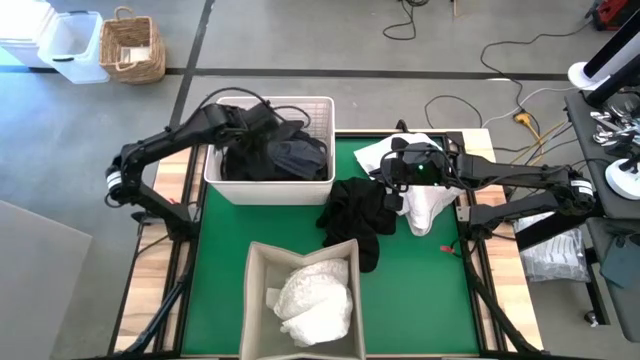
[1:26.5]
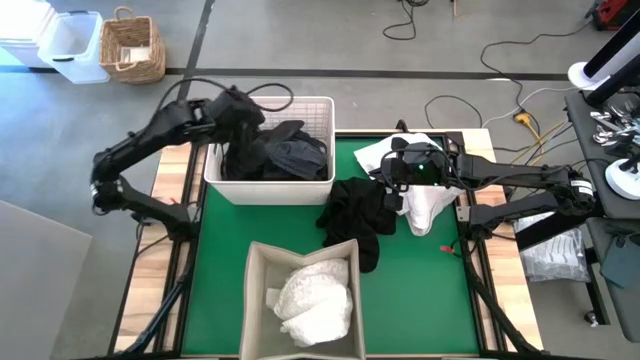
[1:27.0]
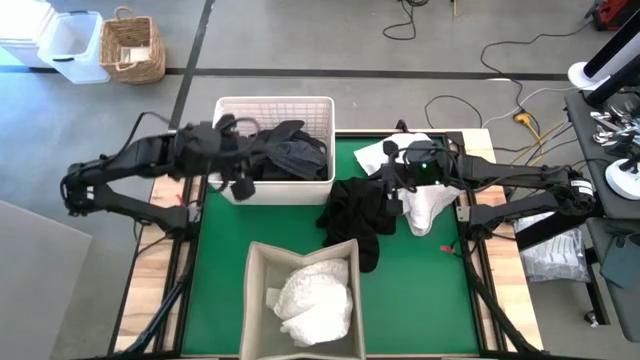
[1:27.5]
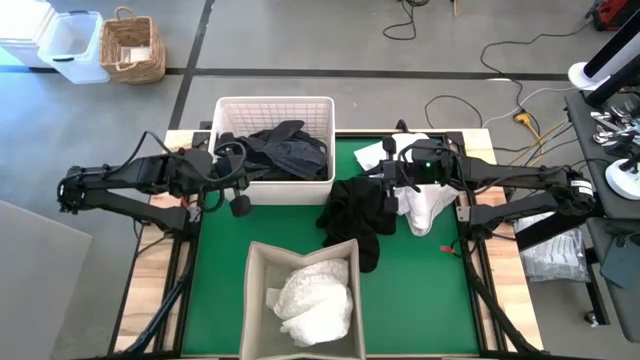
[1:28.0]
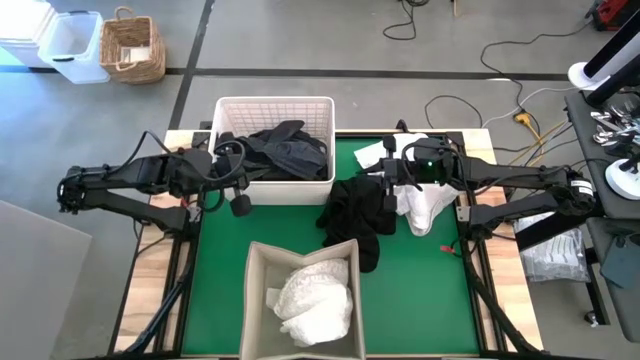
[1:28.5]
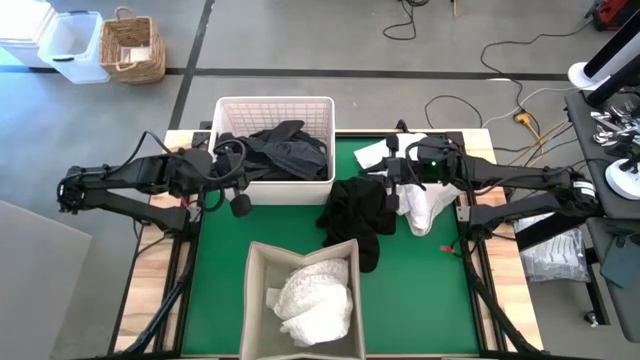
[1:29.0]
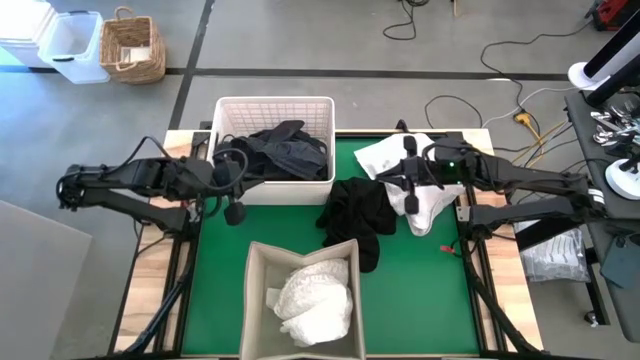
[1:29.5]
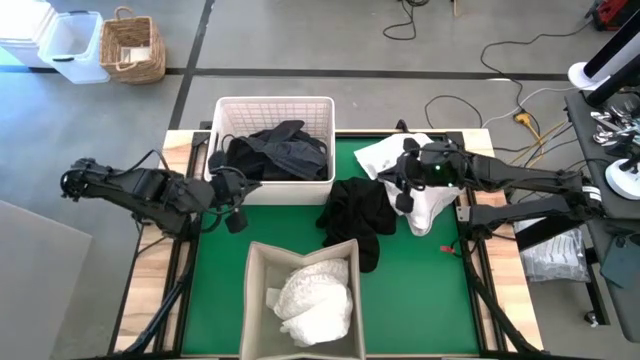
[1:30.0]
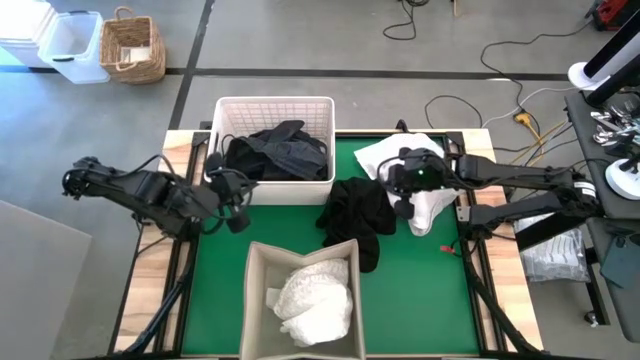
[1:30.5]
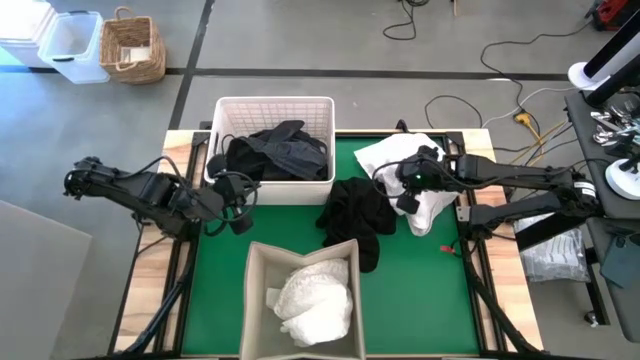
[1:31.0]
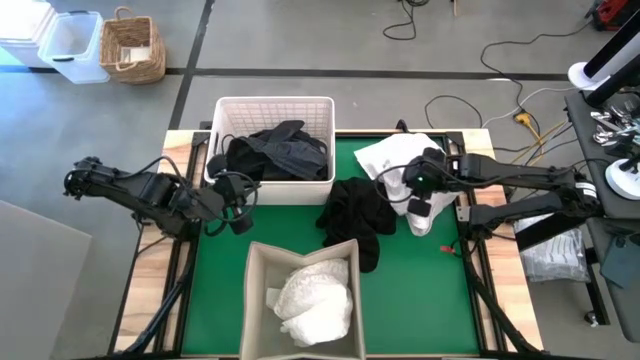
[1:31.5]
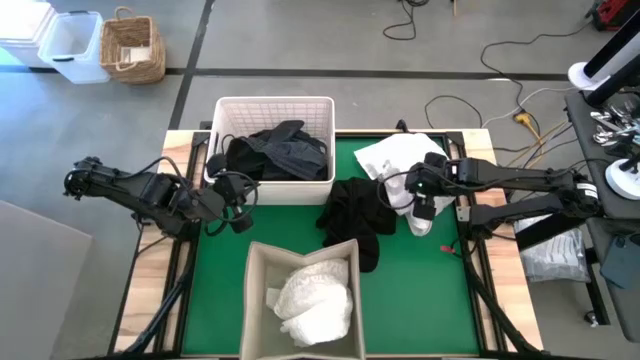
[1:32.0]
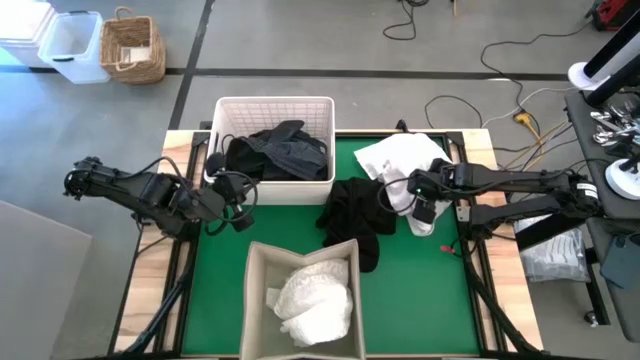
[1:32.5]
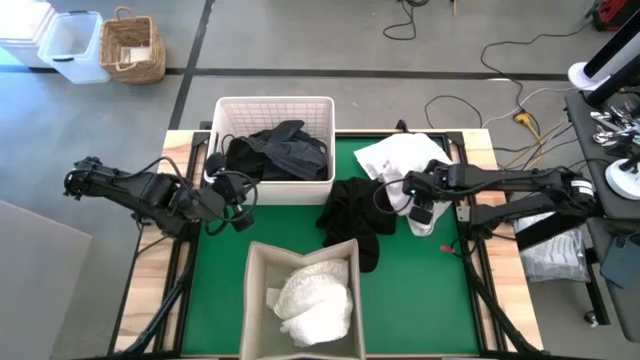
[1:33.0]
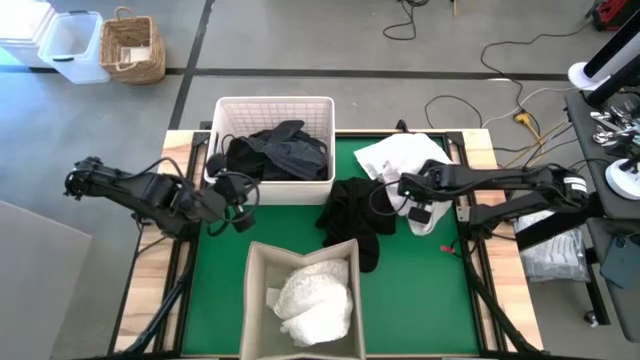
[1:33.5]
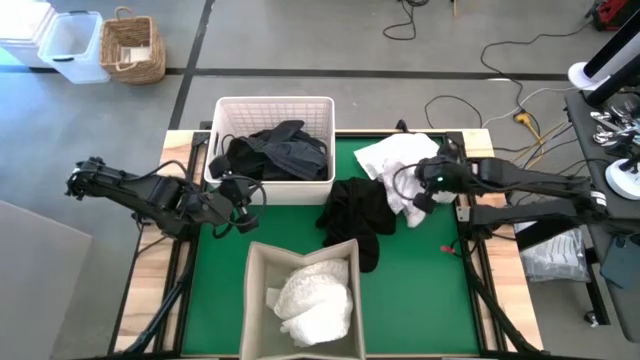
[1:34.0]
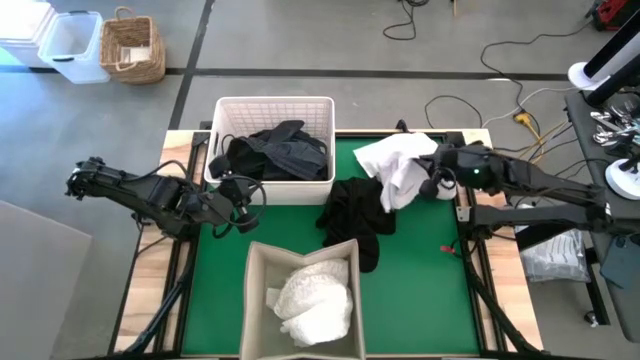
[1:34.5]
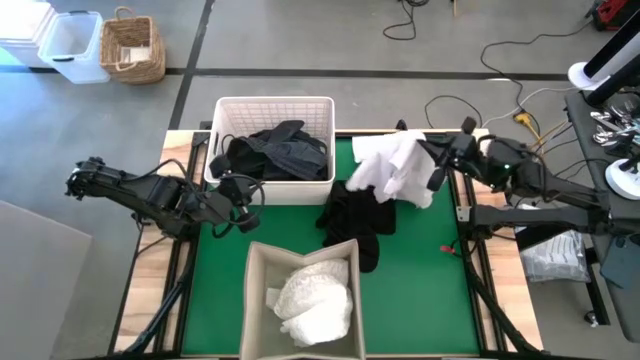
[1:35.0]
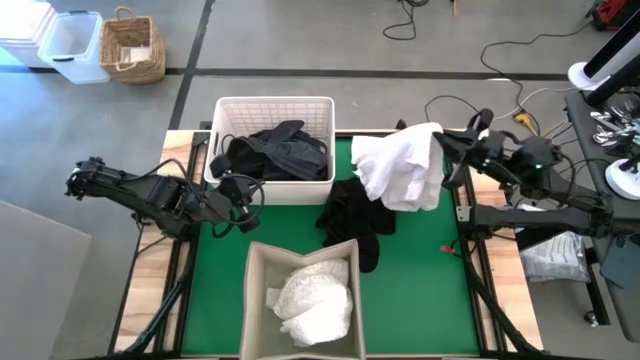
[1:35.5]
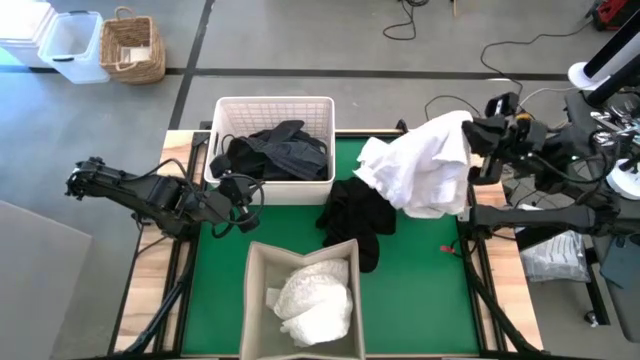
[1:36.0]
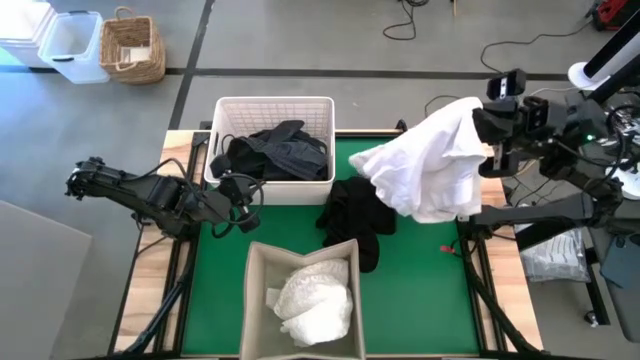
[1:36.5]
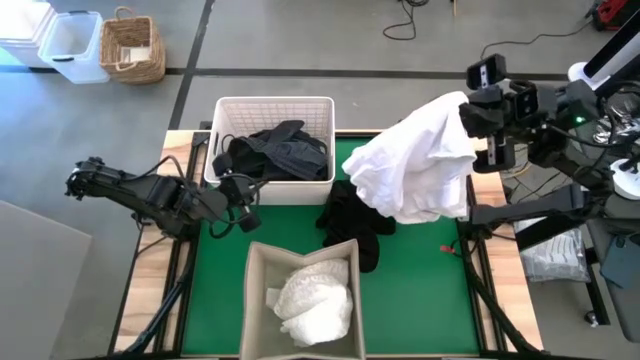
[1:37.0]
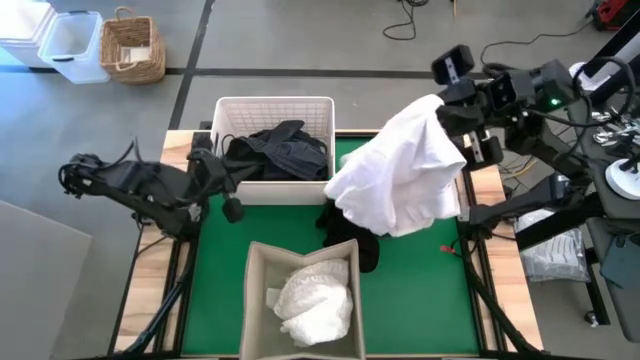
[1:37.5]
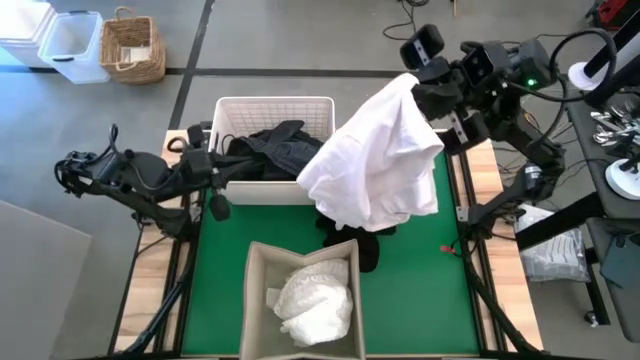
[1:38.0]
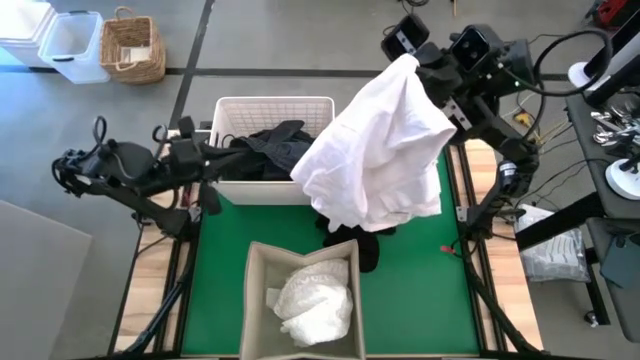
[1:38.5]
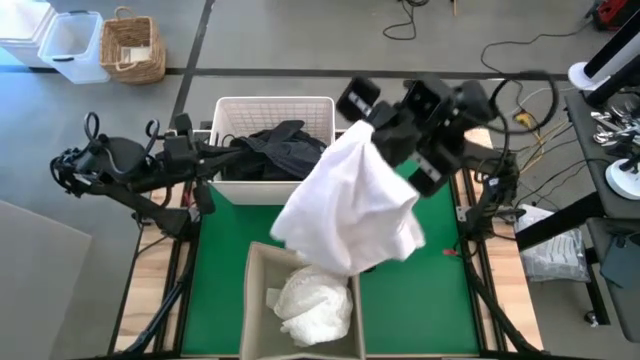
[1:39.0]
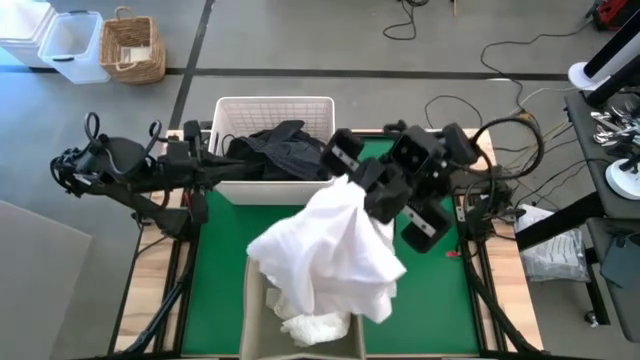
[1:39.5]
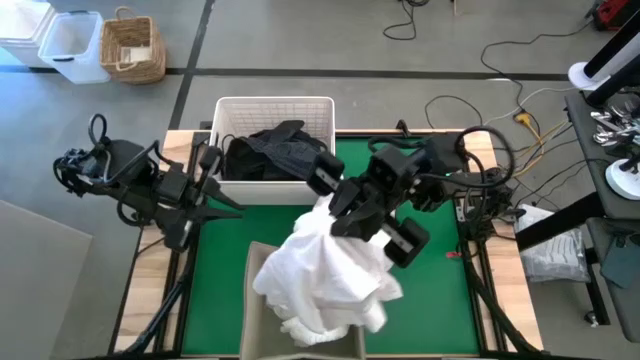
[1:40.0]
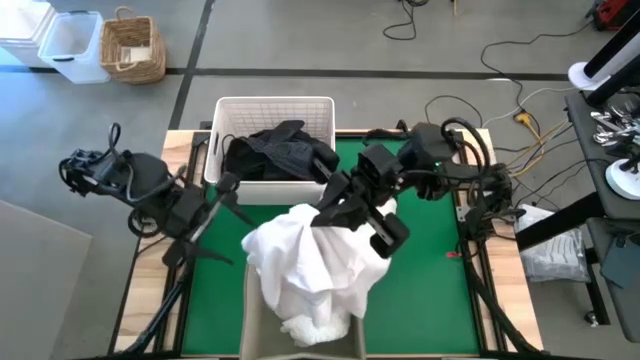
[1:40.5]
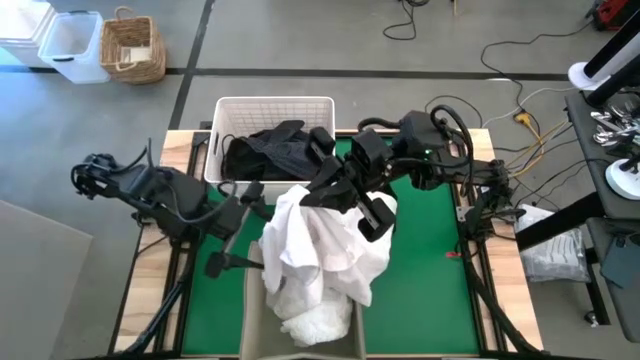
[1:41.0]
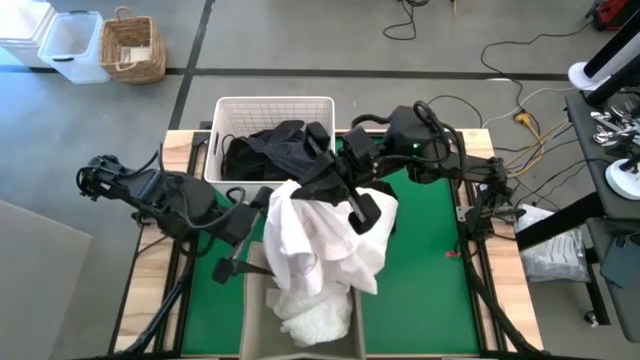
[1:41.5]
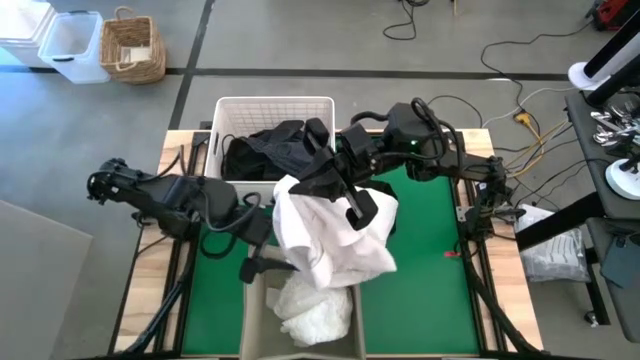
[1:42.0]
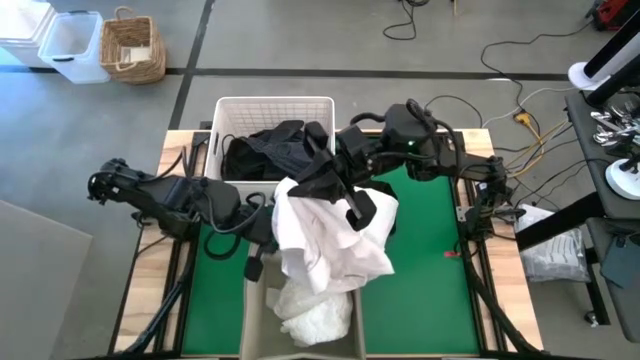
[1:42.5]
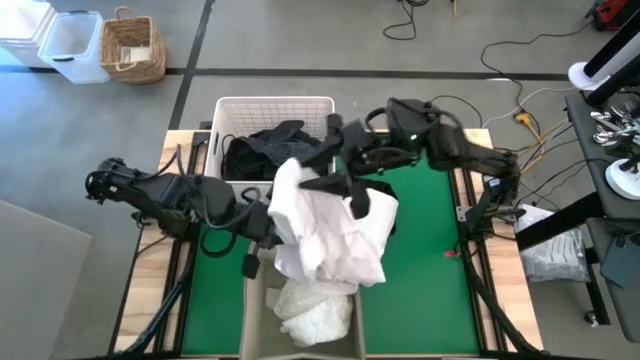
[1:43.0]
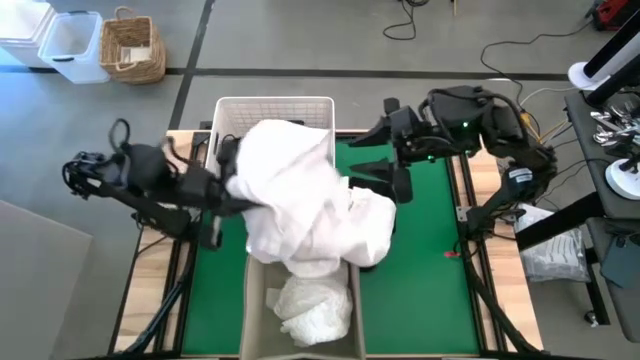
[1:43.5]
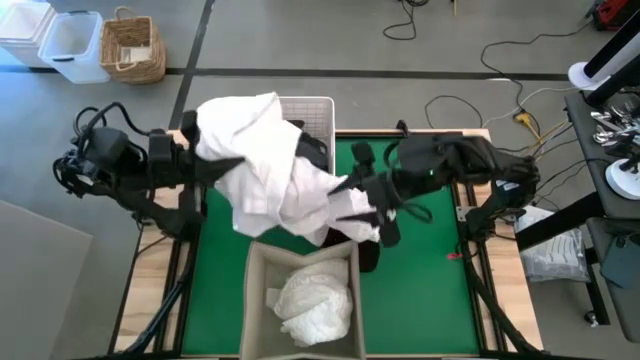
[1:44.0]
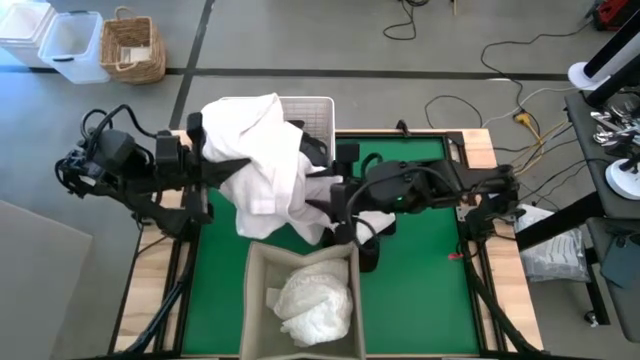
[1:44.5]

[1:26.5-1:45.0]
Put the white shirt into the laundry organizer
